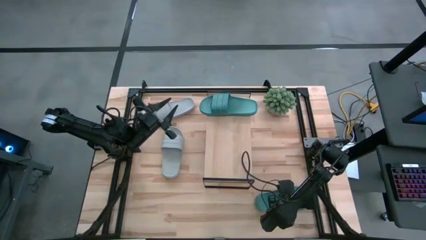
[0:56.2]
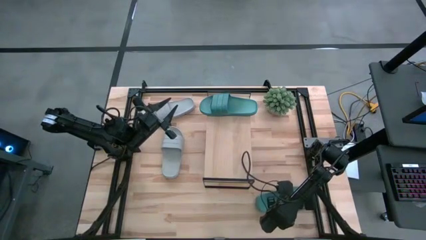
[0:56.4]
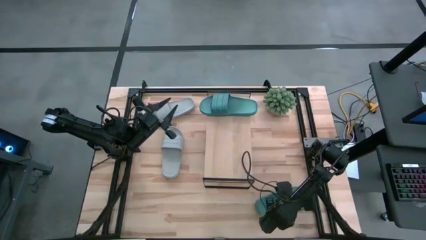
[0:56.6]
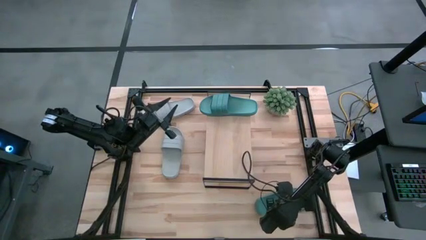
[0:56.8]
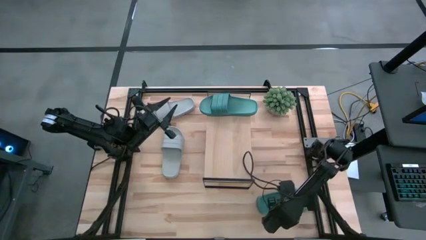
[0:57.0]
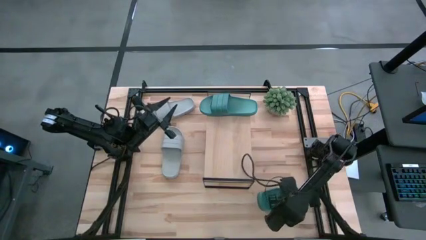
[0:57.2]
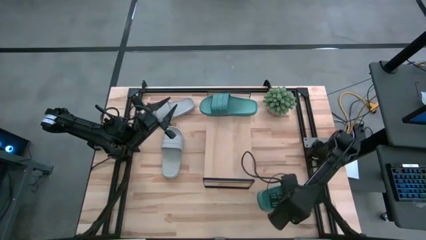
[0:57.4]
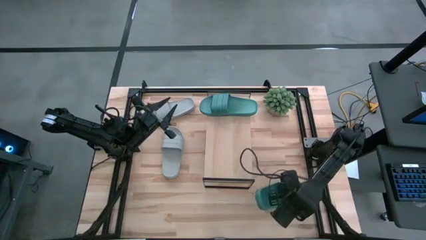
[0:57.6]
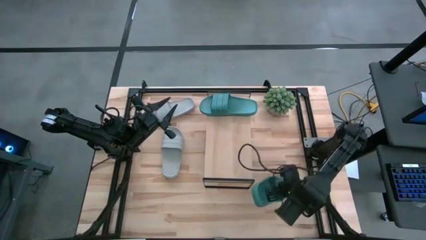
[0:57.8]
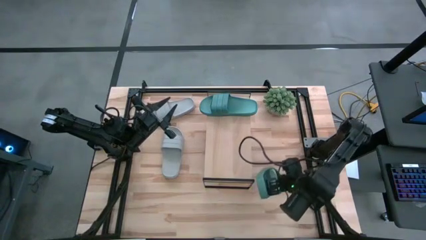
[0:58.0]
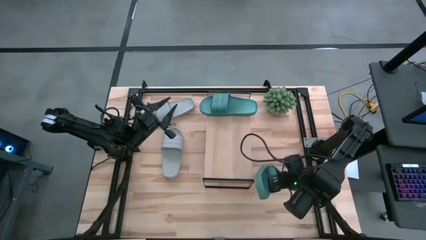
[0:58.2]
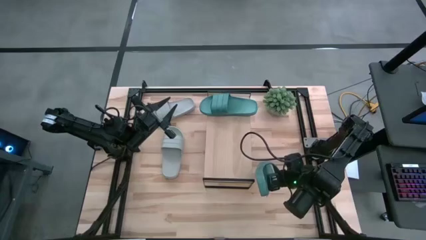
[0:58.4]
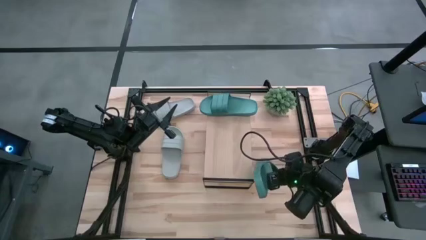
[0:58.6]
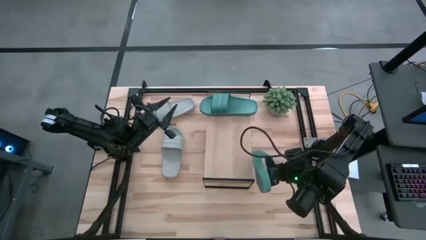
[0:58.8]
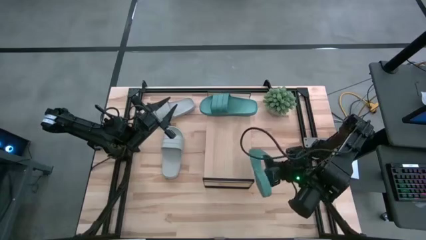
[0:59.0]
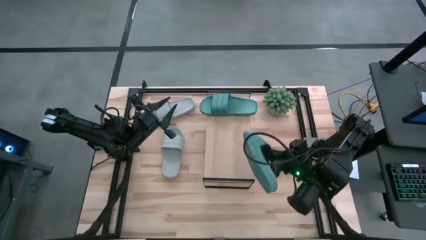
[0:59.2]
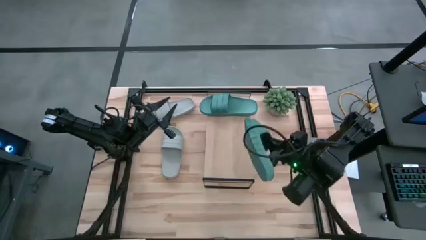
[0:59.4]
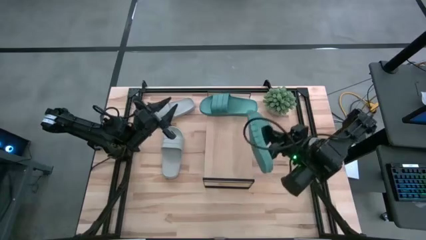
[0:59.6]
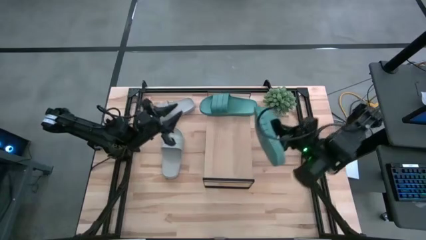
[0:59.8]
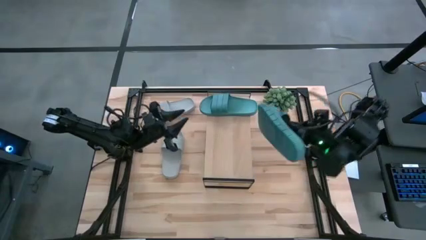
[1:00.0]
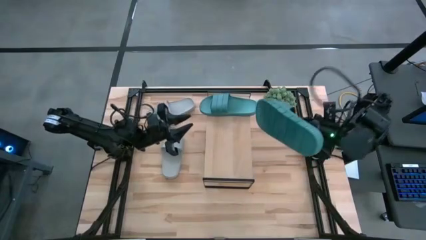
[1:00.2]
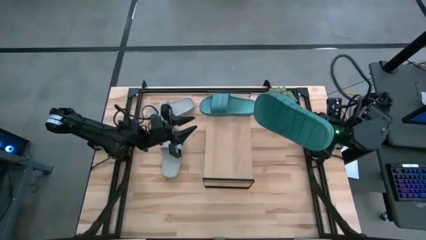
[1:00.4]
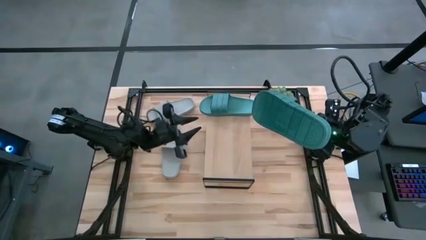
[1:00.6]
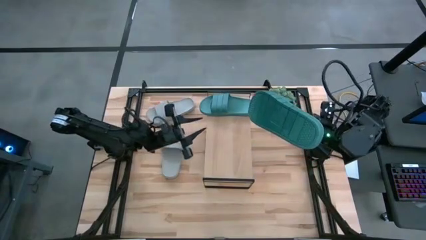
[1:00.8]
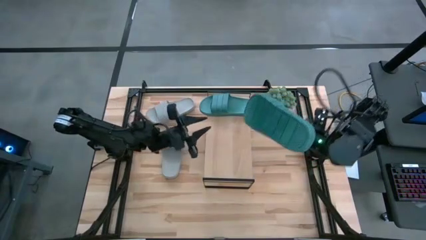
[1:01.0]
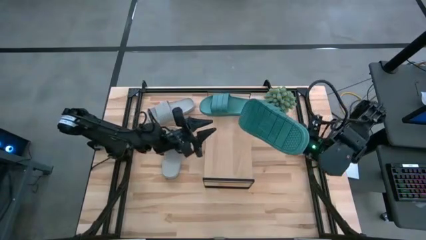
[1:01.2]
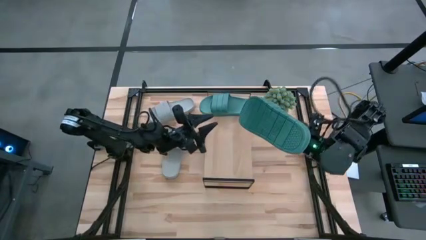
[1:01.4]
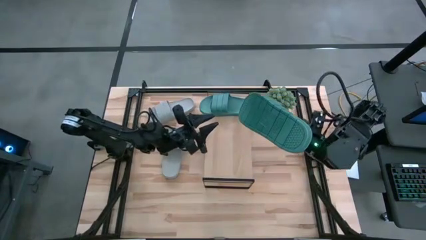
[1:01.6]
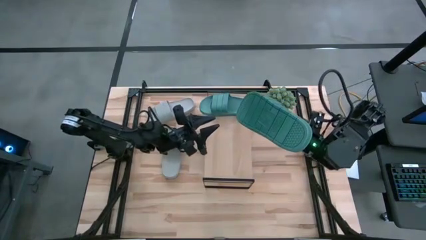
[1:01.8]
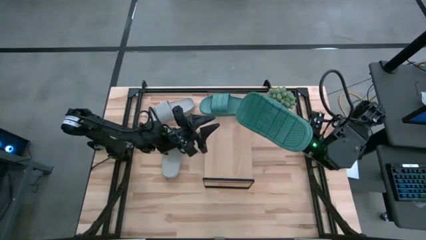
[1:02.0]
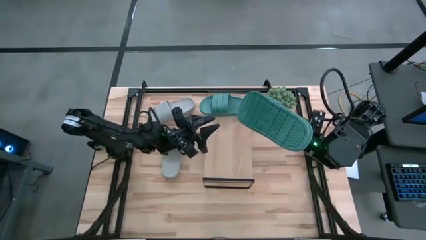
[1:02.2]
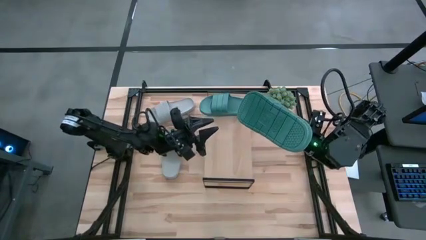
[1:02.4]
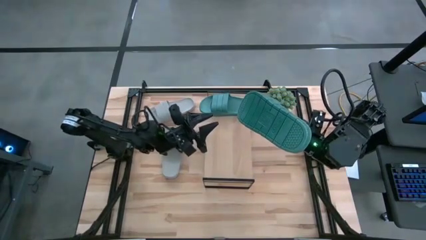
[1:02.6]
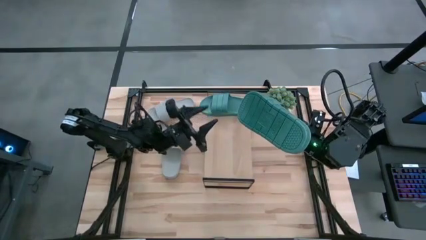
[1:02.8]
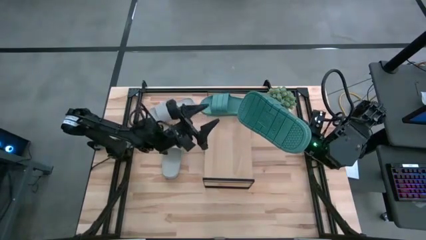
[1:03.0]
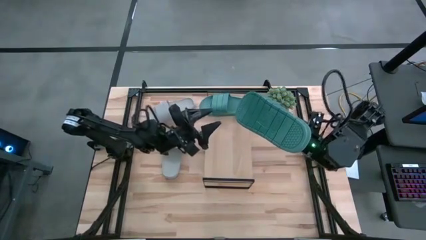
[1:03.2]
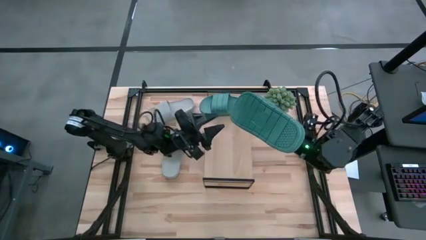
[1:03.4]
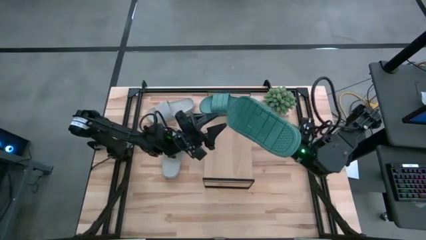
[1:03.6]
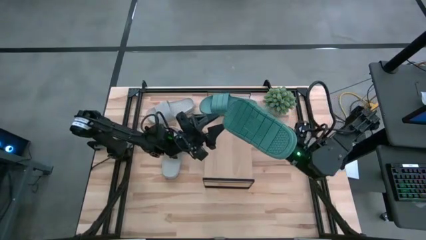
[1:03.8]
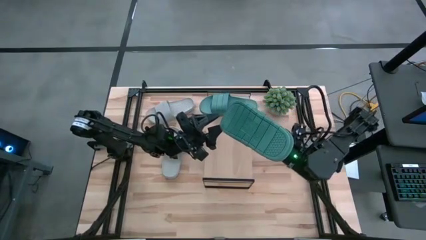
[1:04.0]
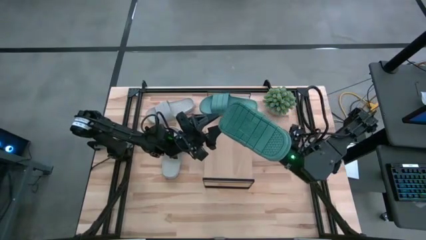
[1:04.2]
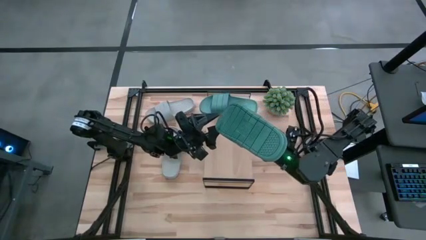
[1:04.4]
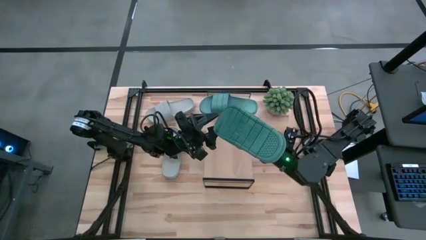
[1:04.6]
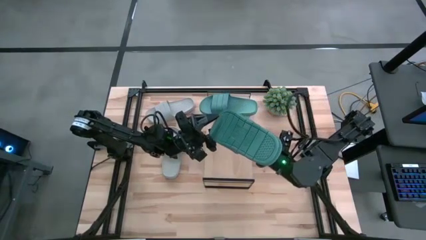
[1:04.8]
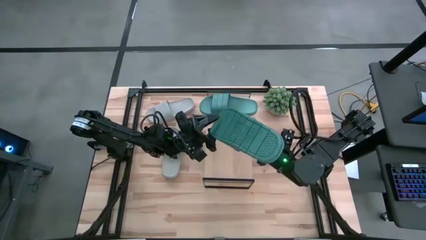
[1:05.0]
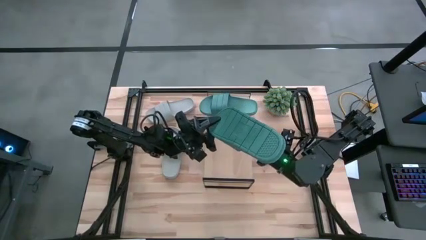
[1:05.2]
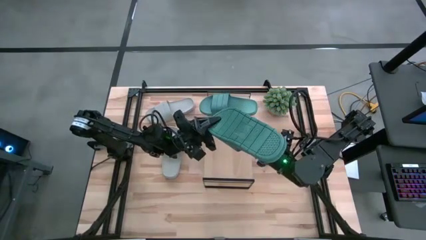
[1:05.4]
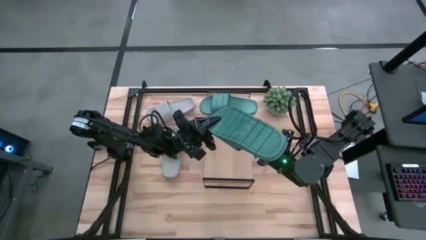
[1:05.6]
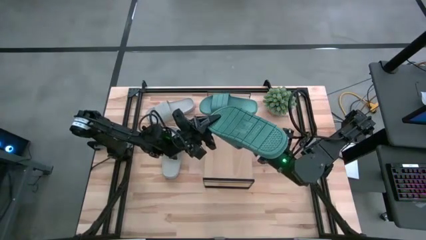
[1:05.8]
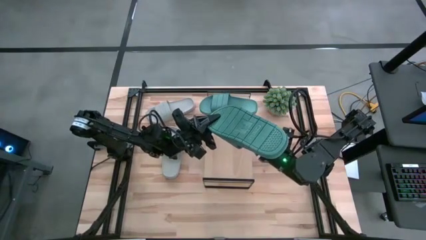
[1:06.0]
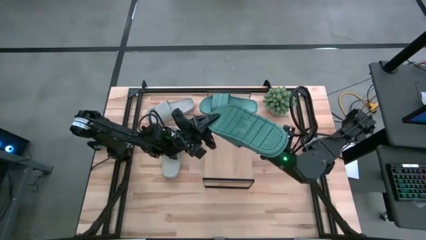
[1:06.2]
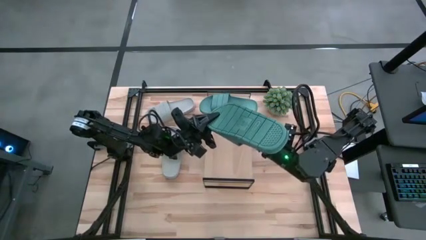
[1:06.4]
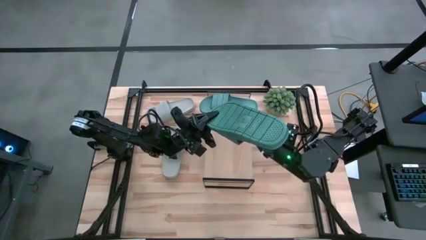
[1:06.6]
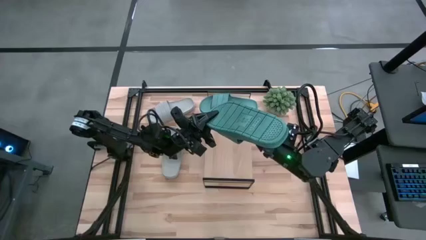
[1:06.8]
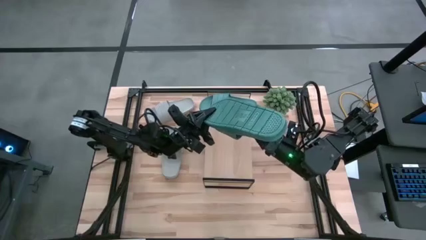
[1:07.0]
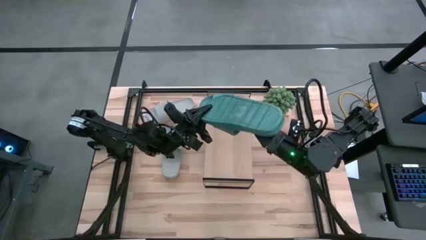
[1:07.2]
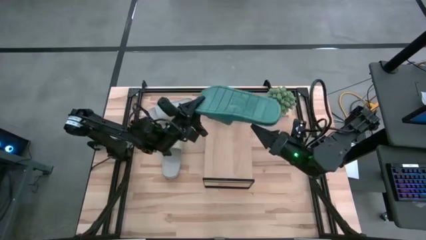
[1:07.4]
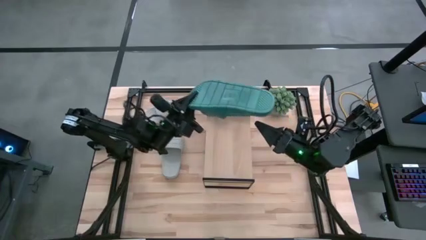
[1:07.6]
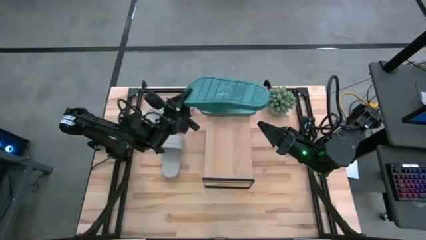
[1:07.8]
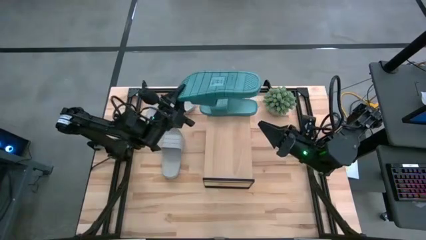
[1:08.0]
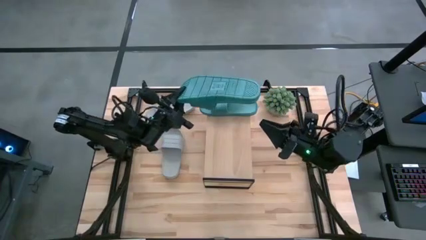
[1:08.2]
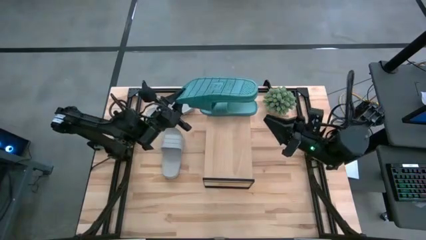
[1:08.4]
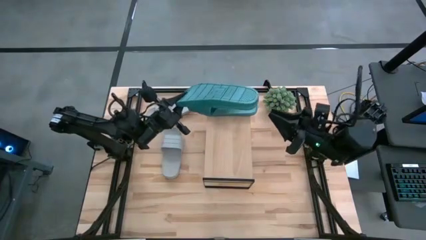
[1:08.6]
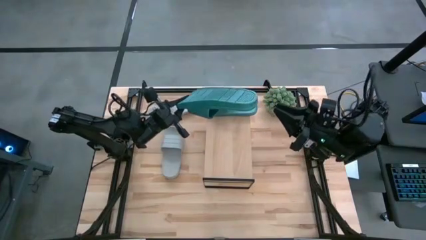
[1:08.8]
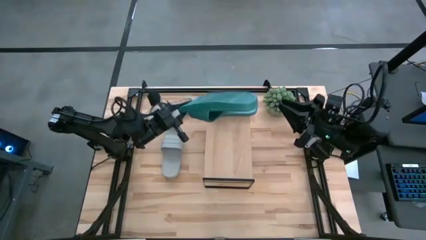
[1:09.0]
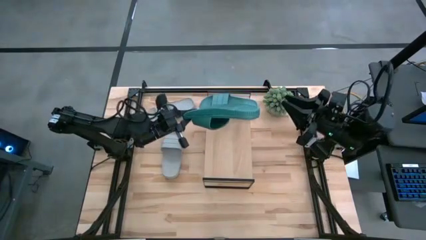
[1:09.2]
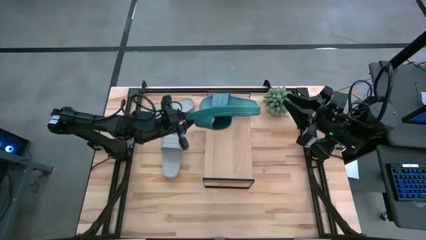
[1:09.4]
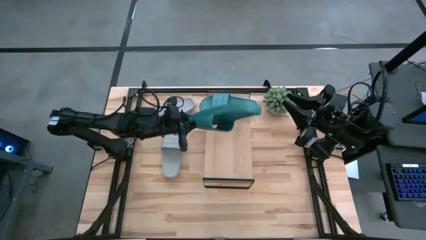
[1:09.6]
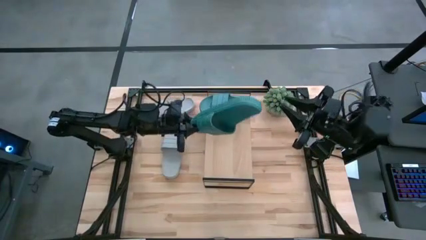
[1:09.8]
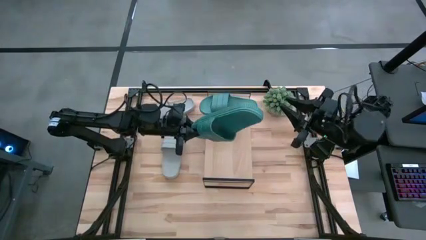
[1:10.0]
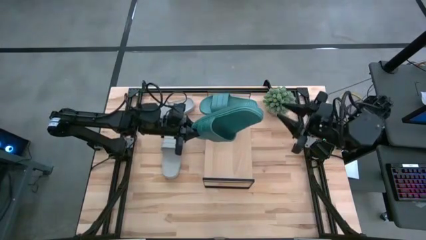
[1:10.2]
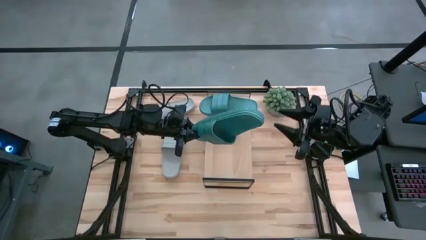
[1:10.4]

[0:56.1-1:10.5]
Task: Pick and place slides into the shelf
Put the green slide on the shelf
